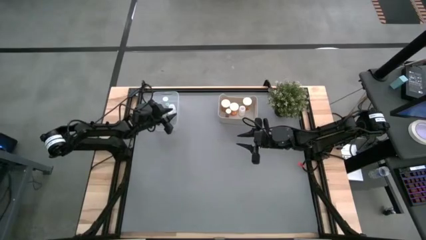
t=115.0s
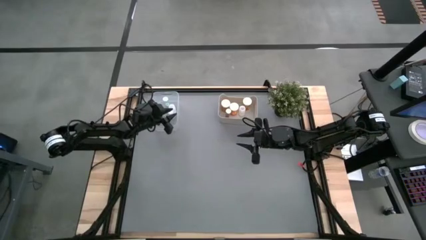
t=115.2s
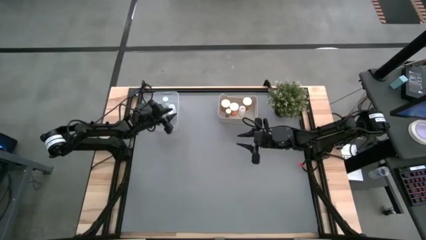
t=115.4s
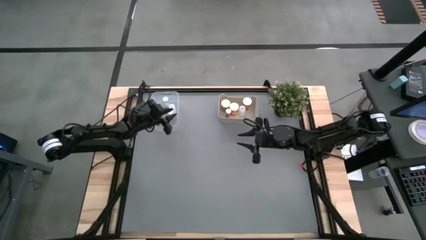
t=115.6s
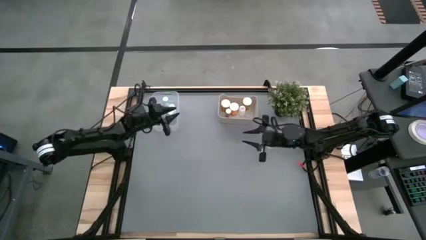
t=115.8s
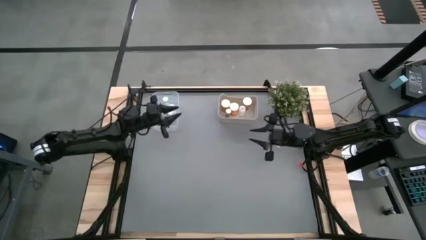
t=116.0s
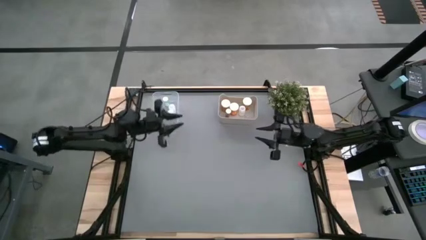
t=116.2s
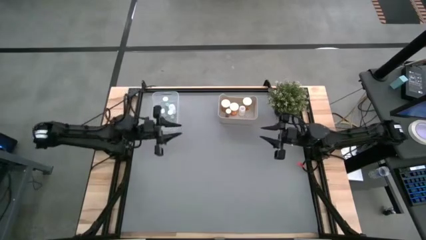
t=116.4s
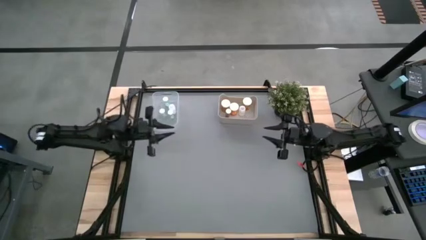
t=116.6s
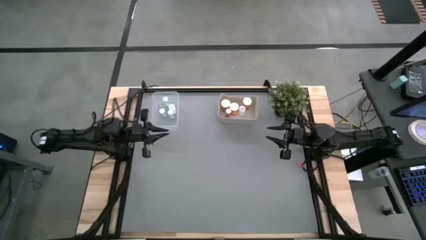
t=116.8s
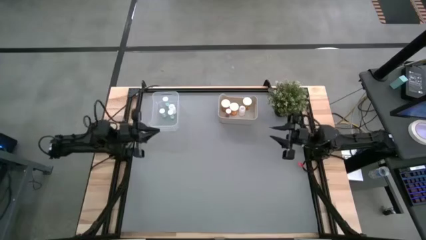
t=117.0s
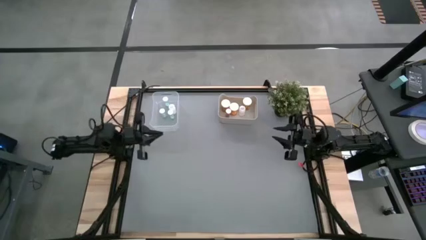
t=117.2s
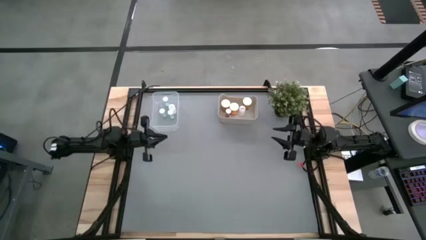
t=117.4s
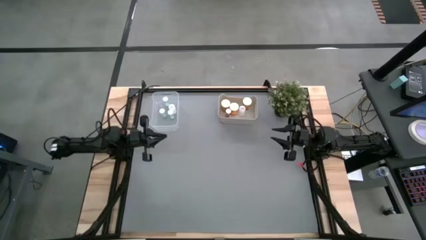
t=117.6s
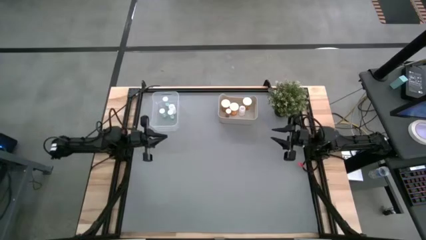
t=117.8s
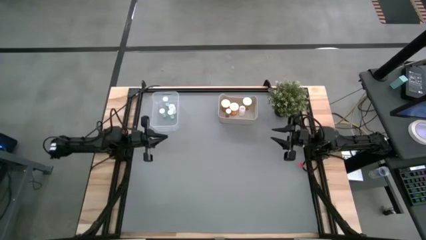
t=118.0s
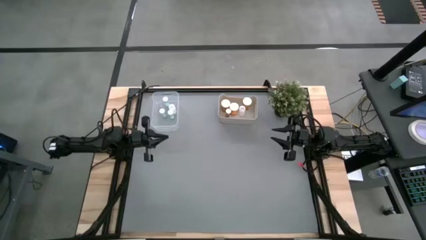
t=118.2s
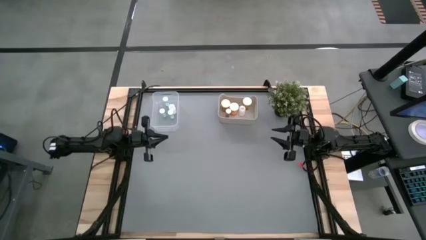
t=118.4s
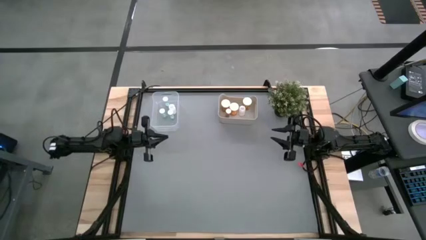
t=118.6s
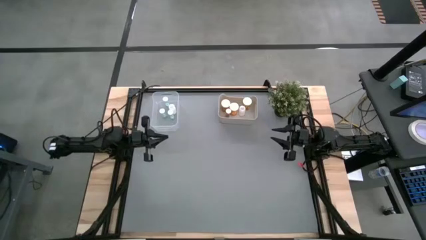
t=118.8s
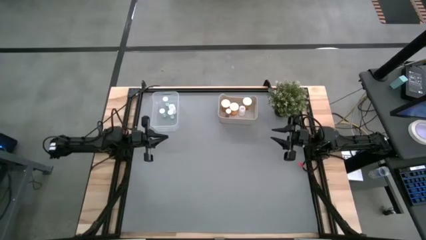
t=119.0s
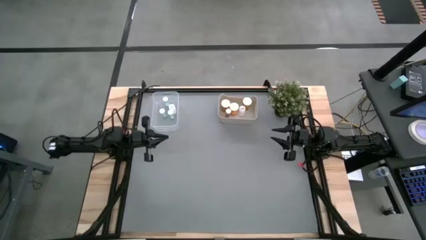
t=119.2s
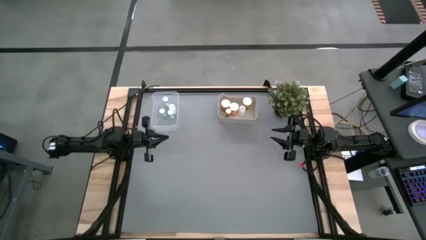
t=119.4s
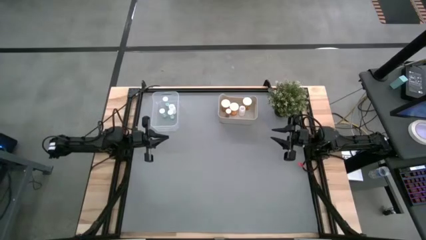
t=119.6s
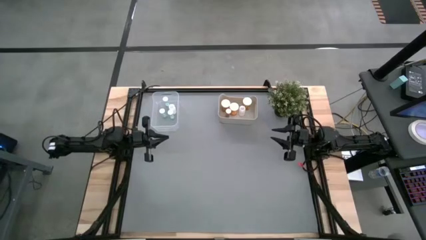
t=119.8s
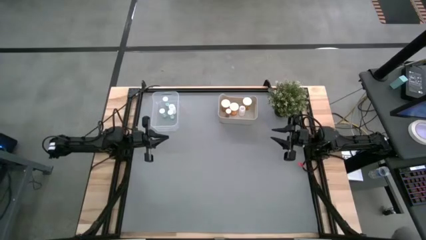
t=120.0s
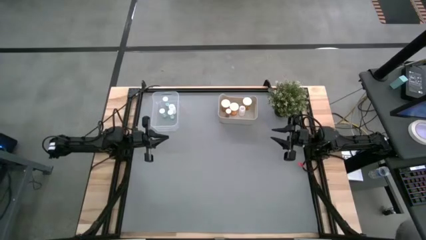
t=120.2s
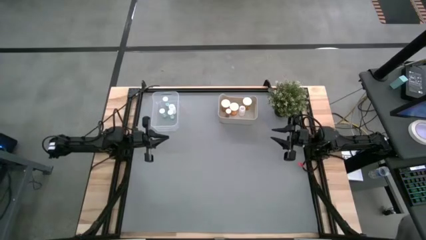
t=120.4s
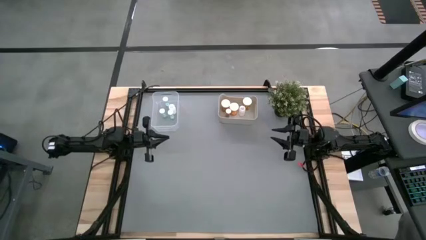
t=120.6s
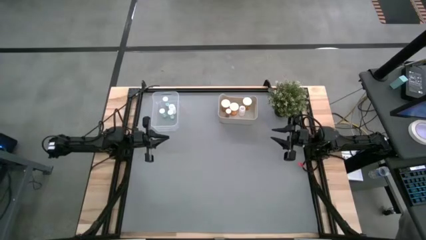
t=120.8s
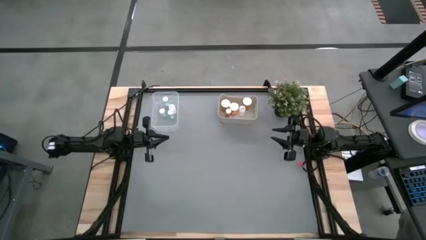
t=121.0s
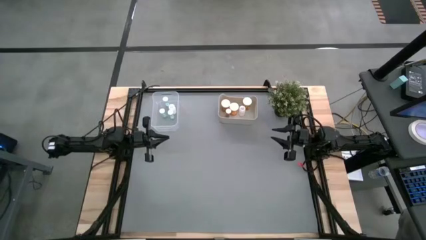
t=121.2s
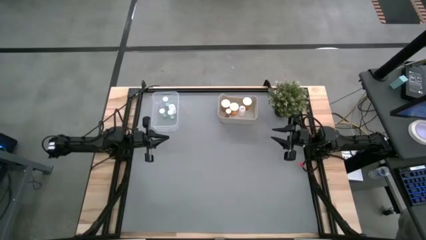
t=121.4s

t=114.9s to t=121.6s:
Task: Pick and place medicine bottles into bin by pill shape (circle, oval)
Return to Home Position

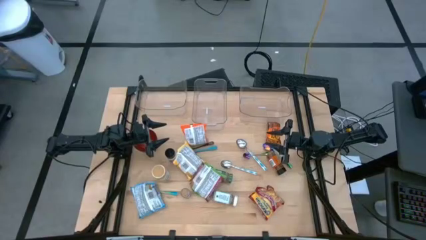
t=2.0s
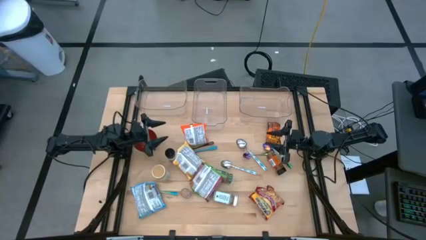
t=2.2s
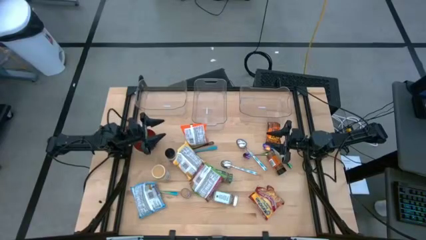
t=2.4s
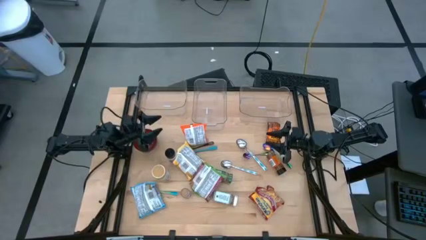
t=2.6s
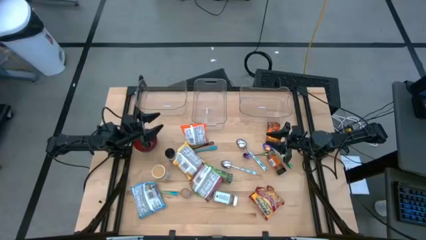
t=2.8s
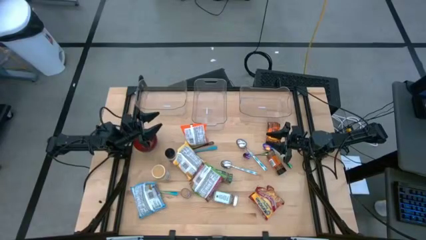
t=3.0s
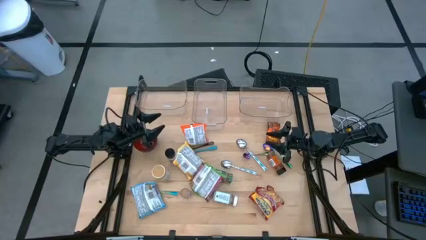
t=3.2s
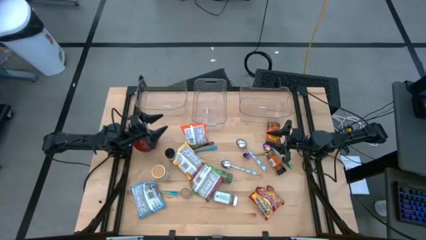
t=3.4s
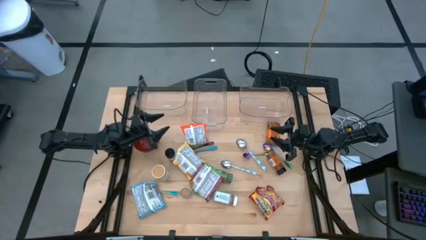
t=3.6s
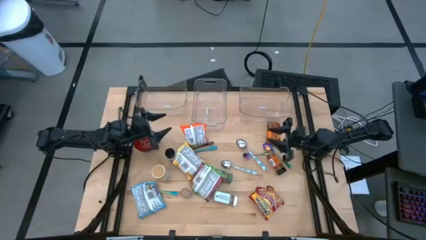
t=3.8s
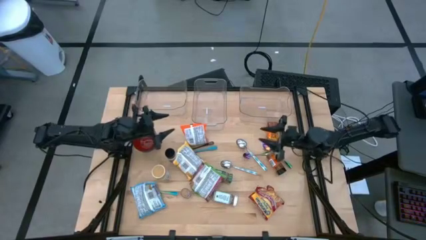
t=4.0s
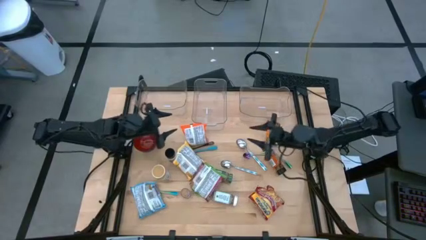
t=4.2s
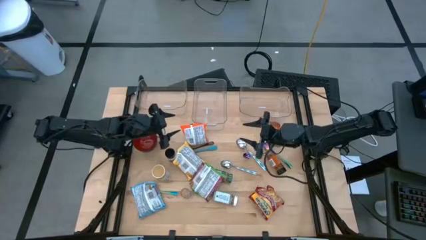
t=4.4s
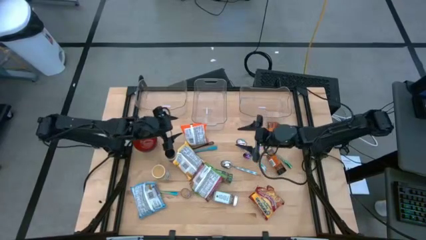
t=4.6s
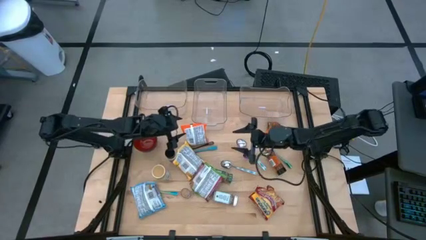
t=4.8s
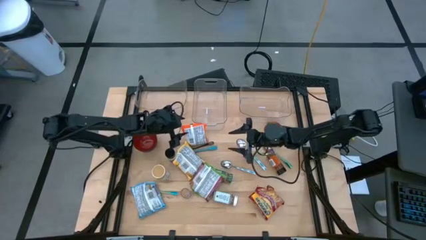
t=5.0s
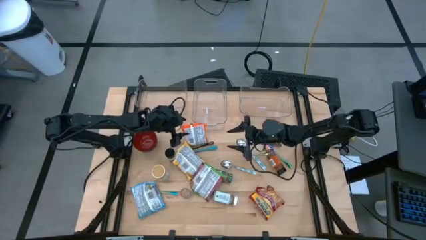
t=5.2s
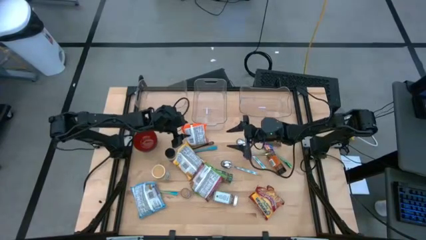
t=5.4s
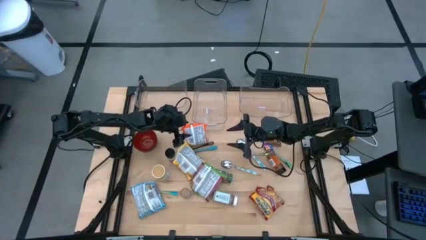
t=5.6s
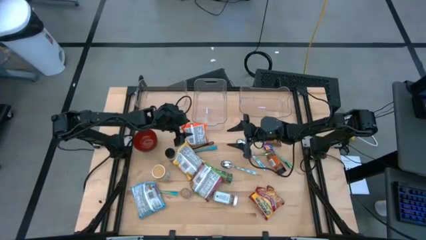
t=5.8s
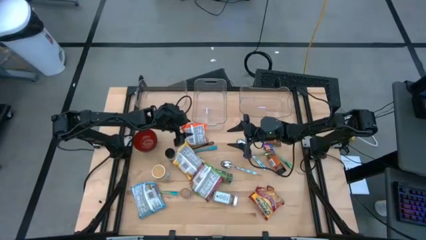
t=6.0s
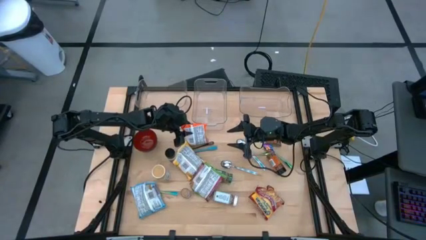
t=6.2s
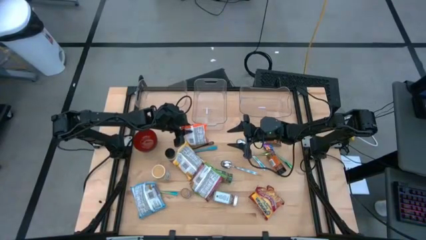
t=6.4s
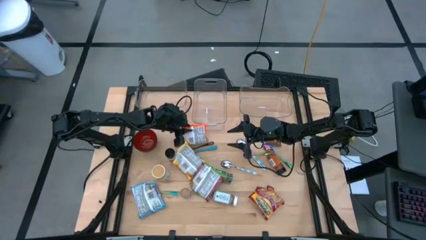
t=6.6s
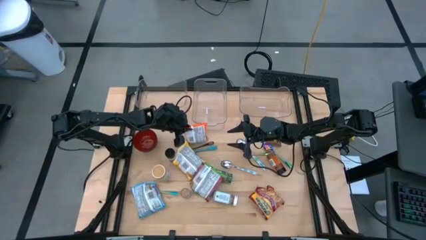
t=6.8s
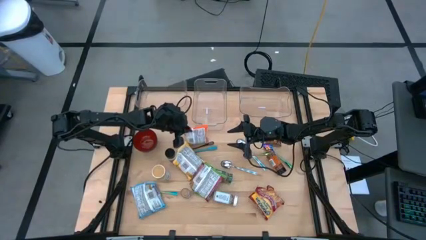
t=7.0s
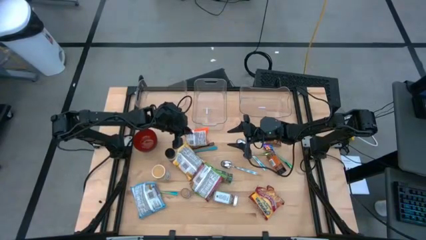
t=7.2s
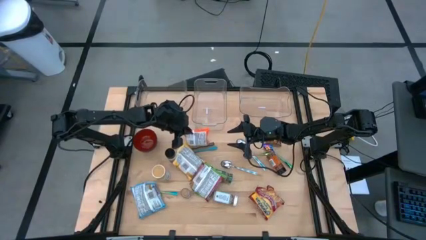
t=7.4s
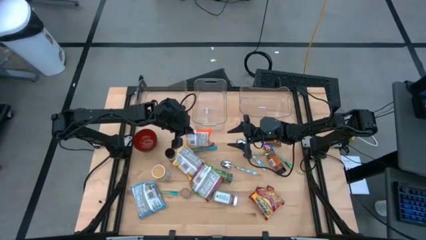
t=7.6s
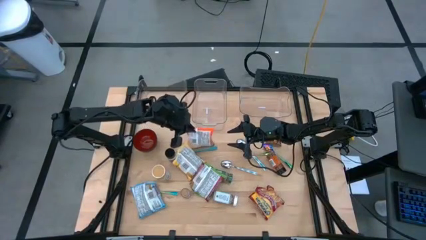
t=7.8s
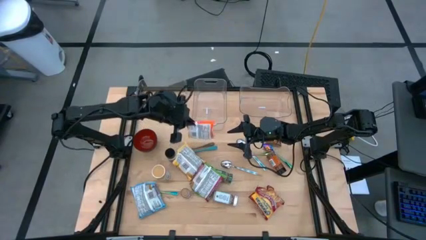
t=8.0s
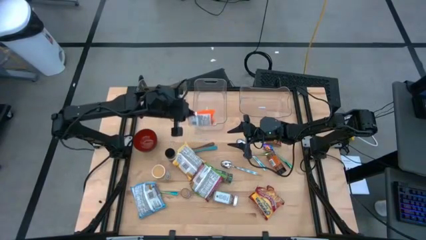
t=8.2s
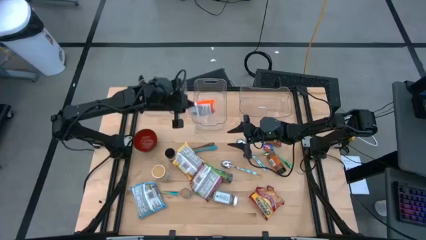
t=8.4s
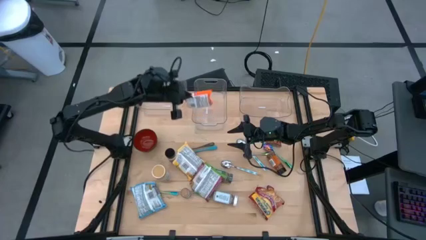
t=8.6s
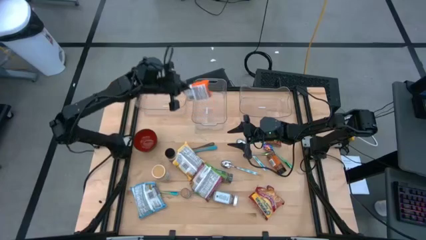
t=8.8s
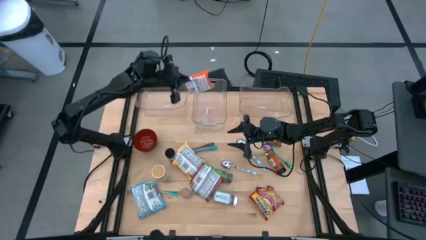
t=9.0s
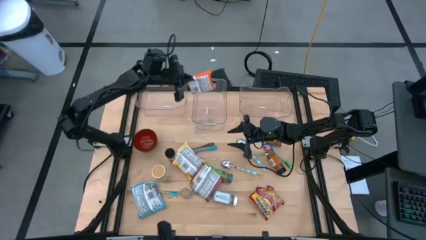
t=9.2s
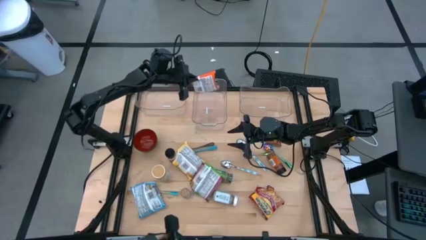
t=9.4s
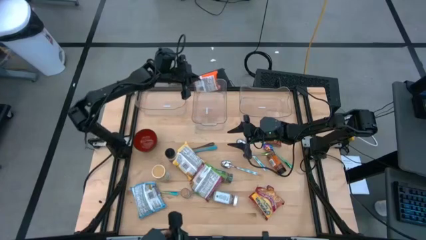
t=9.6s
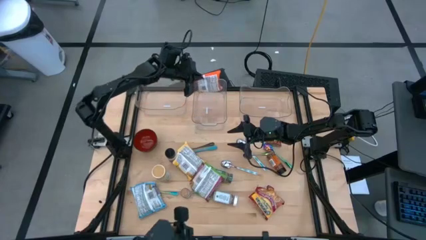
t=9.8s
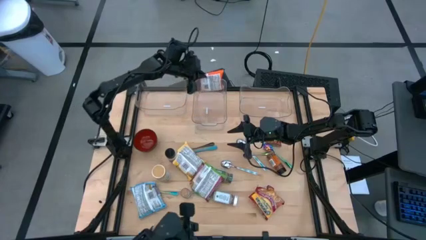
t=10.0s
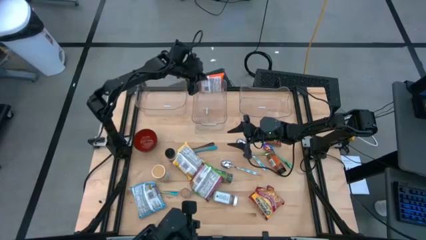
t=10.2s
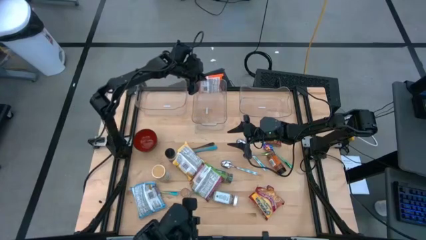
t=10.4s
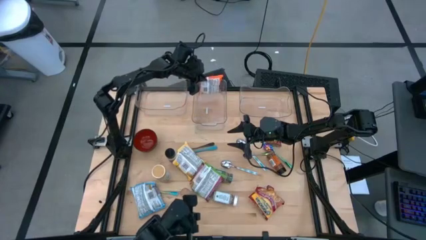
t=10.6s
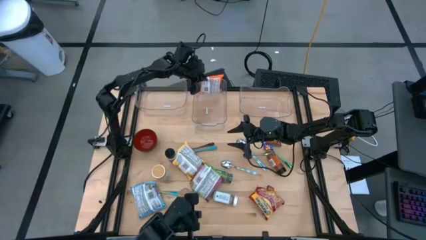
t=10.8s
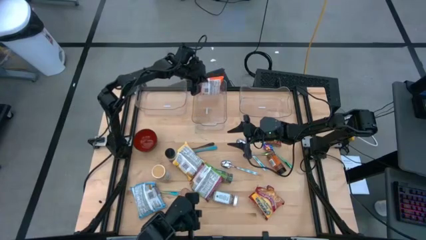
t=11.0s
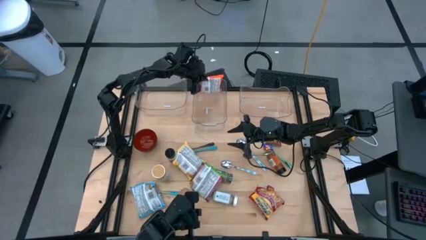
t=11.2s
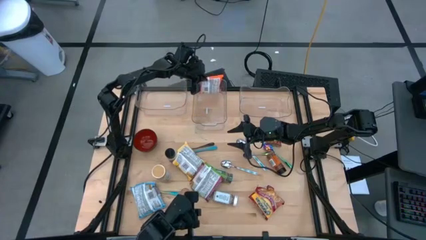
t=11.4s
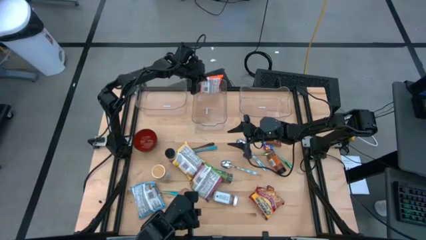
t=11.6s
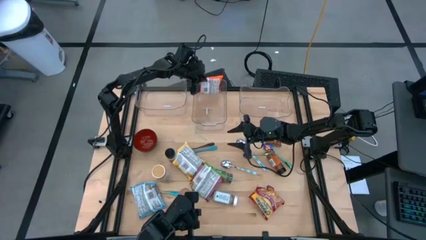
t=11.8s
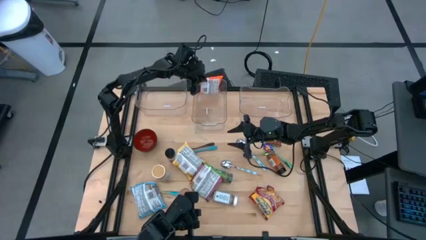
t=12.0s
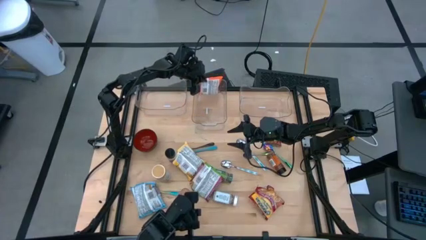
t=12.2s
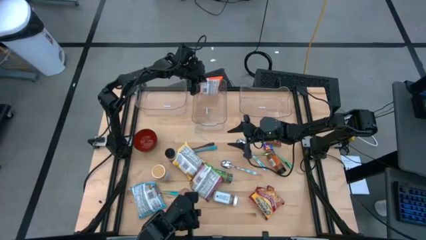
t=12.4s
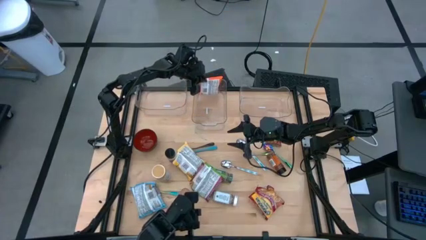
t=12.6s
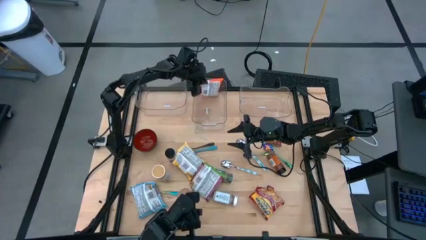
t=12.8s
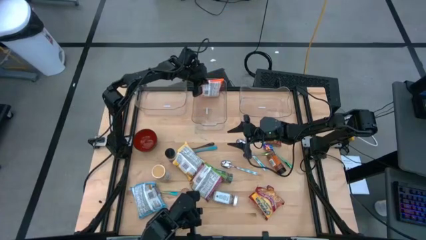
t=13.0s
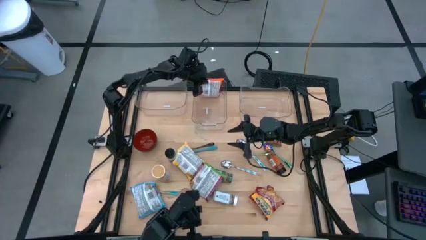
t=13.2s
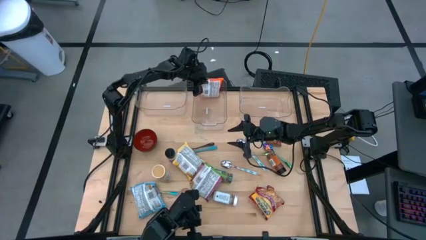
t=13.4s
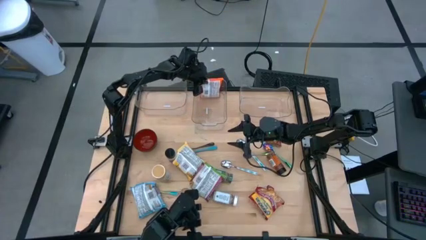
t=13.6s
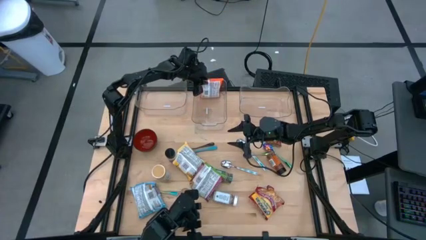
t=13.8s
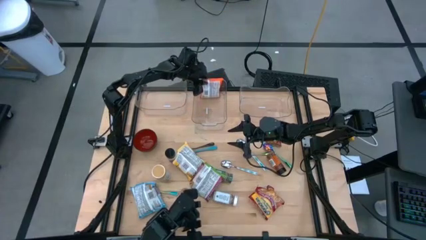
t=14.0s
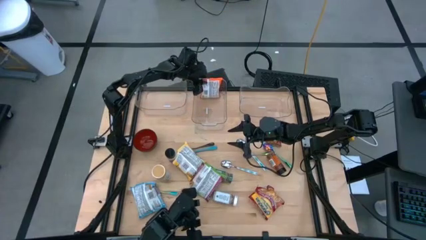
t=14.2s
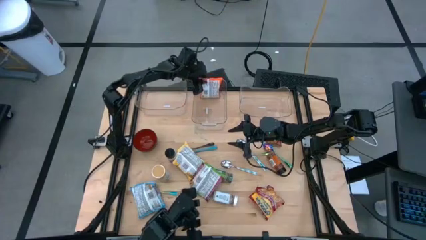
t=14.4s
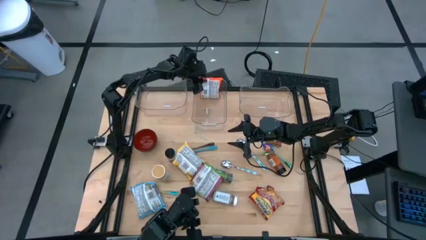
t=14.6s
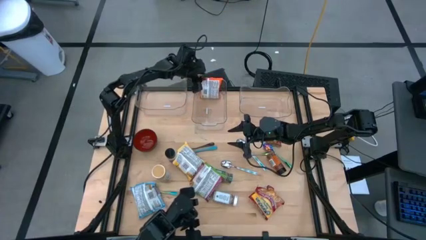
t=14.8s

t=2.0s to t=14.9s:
Task: Pick & Place Food Item
Put the orange noodle pack into the middle transparent bin
